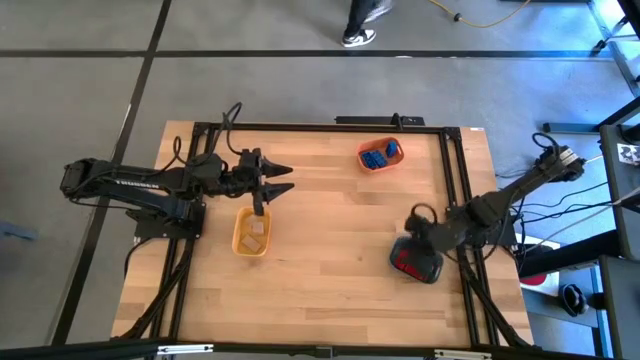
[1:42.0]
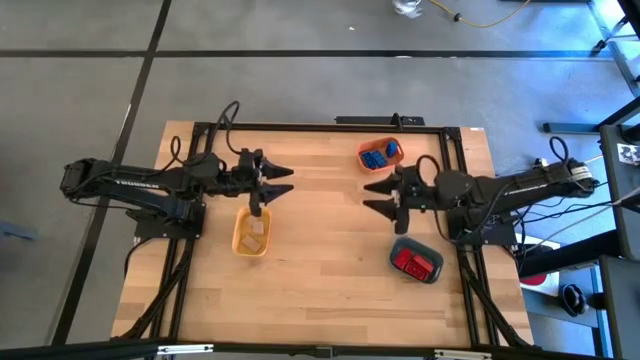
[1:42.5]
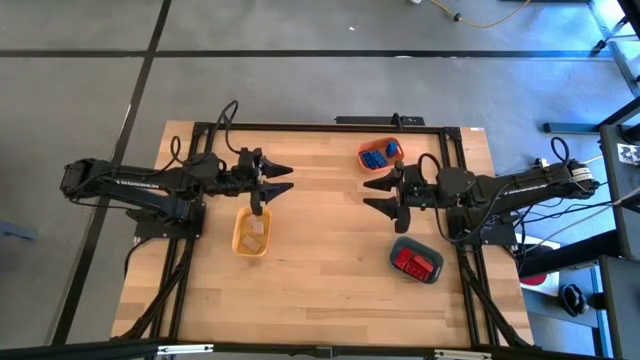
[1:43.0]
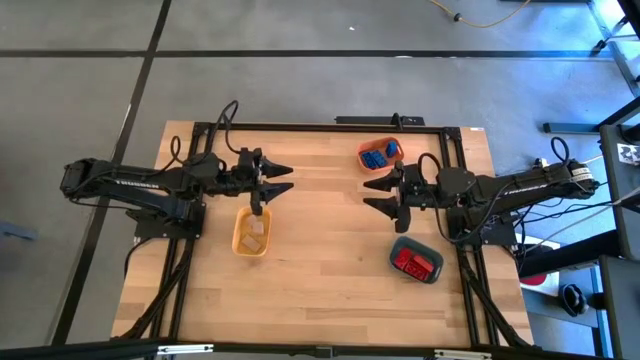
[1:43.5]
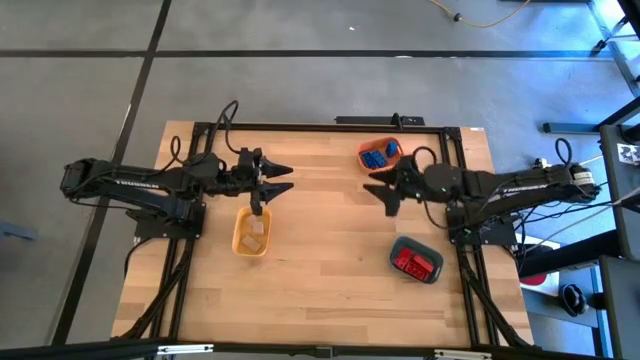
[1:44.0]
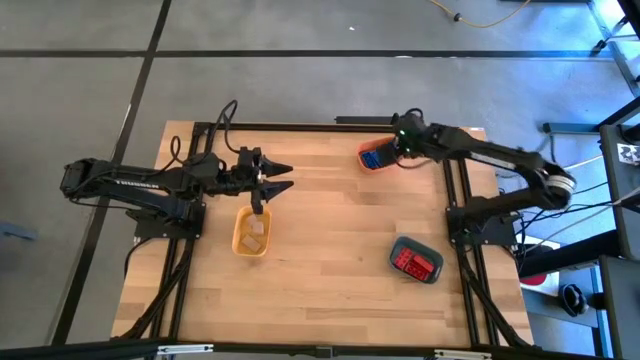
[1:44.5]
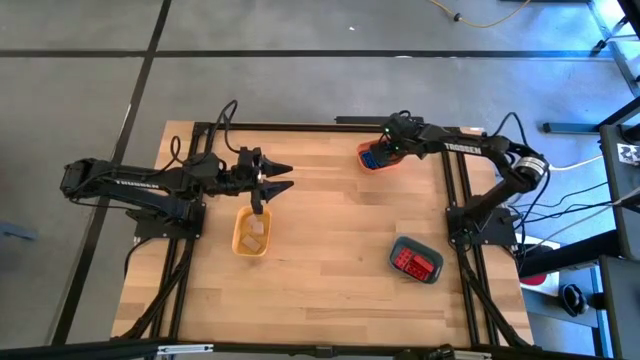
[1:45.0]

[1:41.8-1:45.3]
Task: Sort & place blocks by color
Adjust the blue game piece in the orange bin

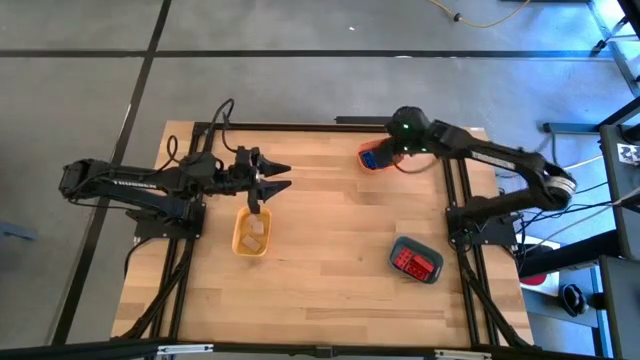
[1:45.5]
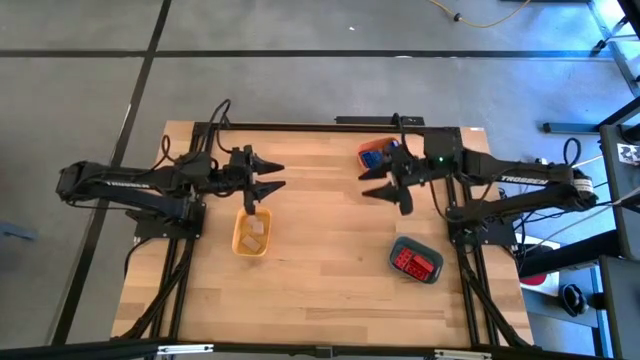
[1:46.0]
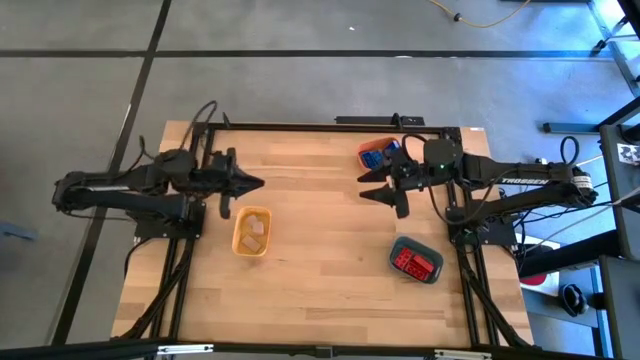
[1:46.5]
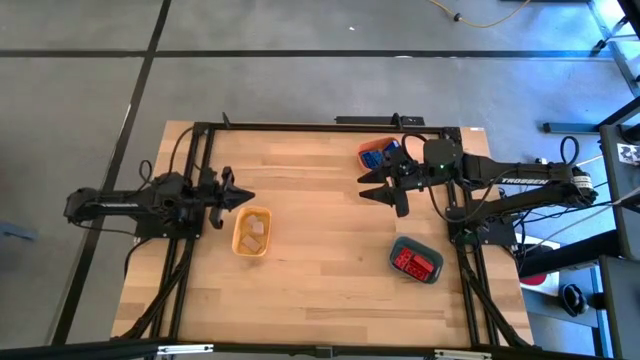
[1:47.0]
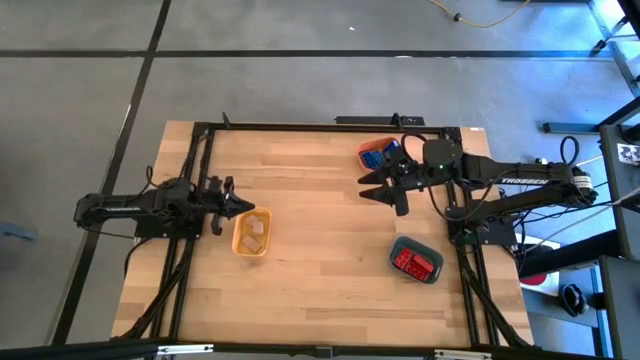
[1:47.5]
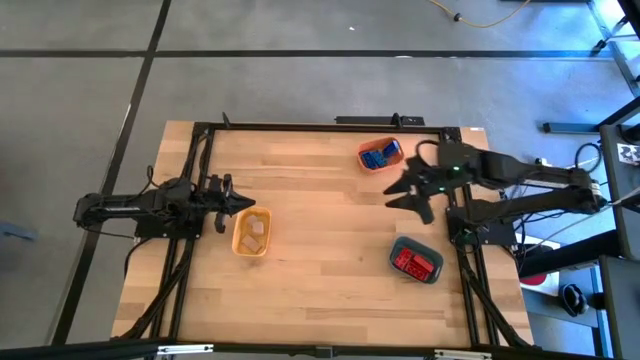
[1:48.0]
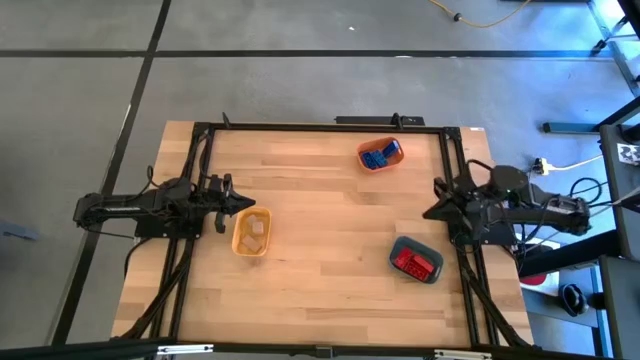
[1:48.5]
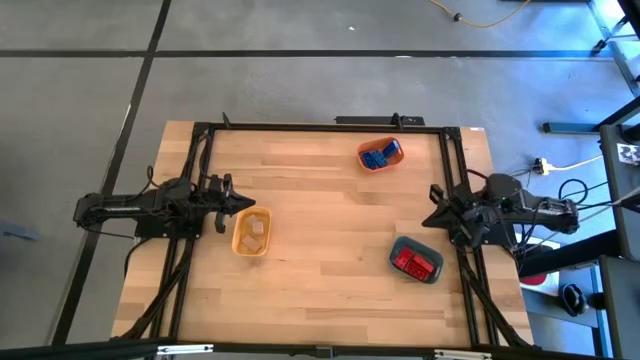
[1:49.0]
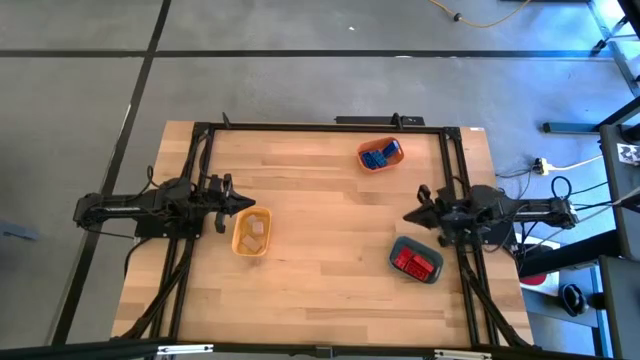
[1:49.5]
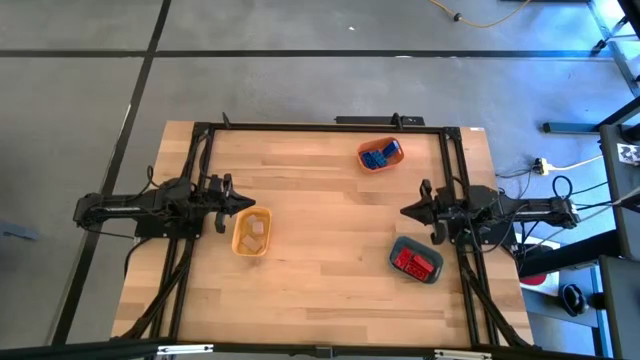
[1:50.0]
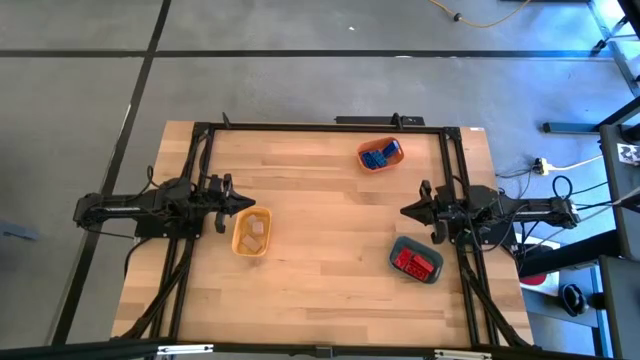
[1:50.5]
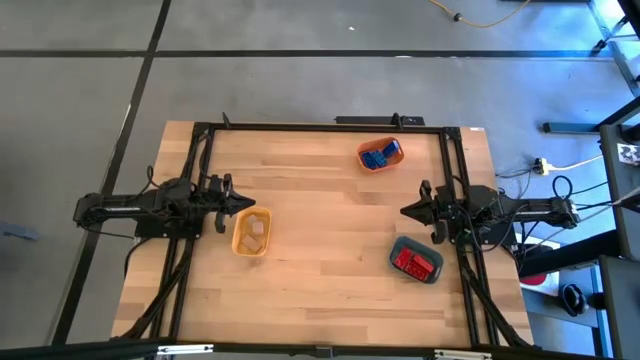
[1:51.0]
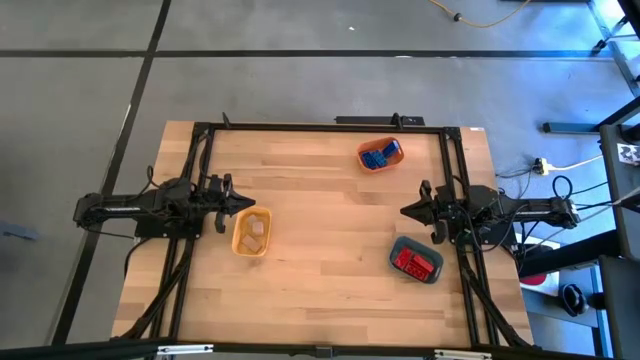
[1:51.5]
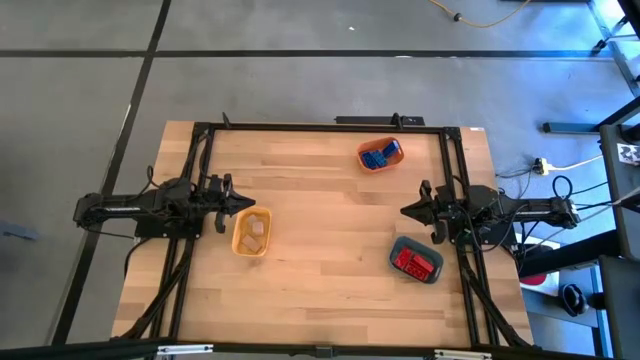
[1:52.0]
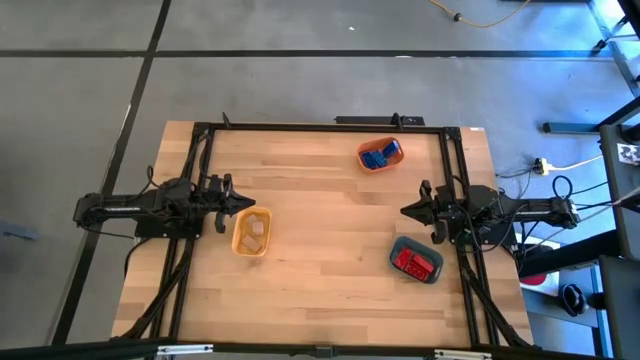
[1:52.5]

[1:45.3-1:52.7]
Return to Home Position

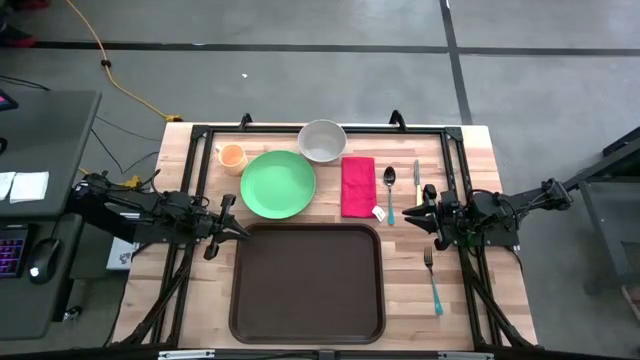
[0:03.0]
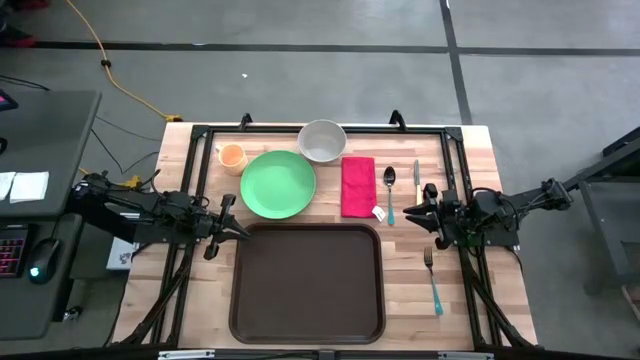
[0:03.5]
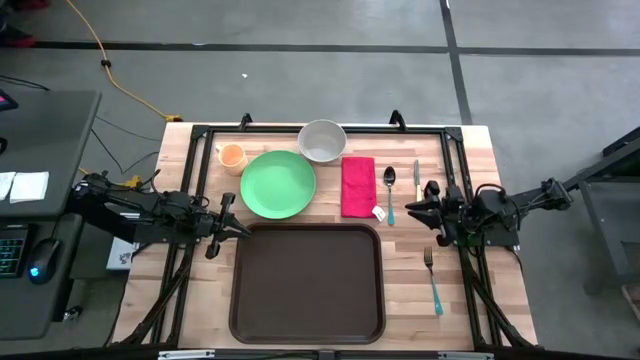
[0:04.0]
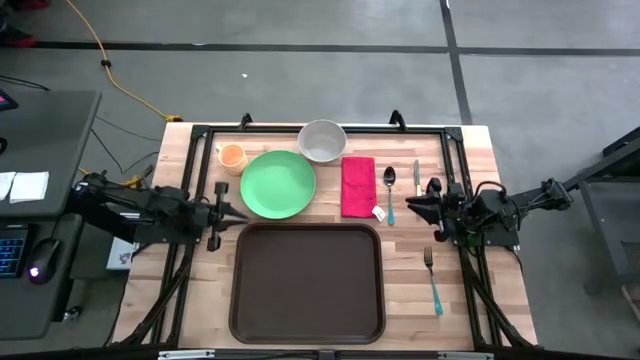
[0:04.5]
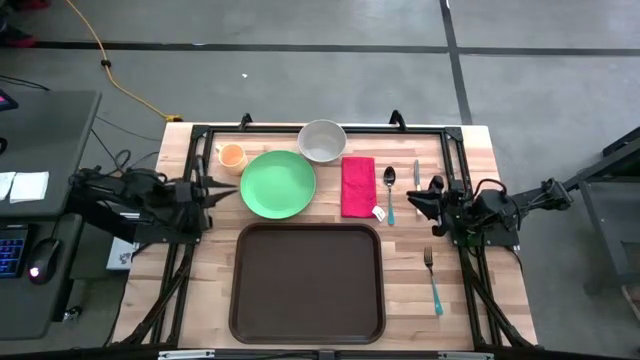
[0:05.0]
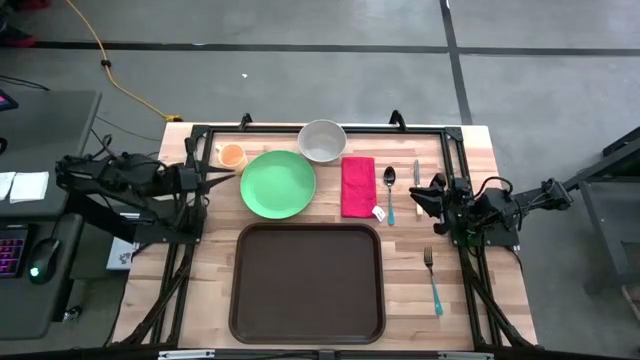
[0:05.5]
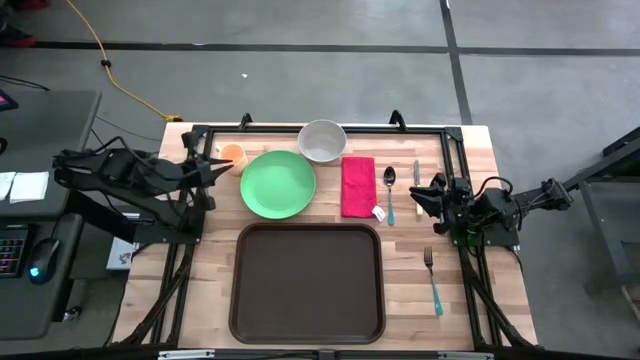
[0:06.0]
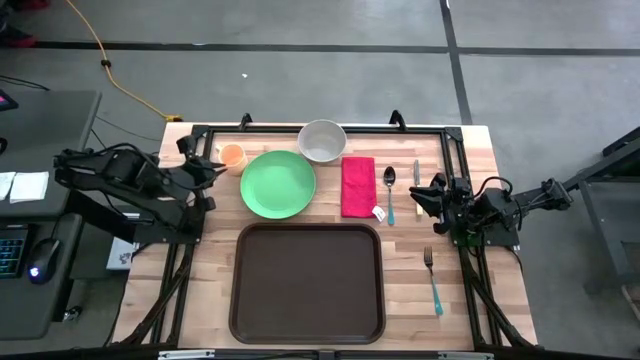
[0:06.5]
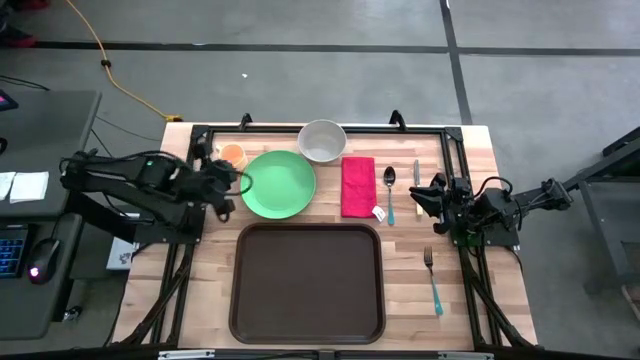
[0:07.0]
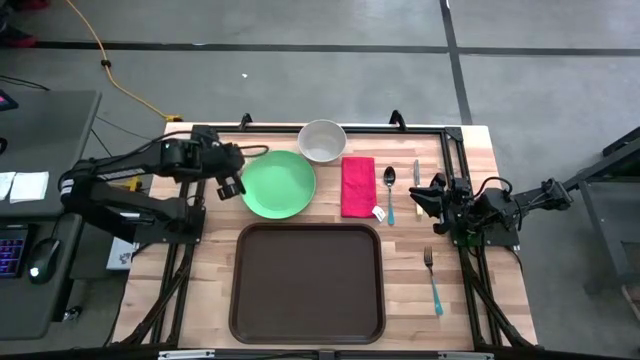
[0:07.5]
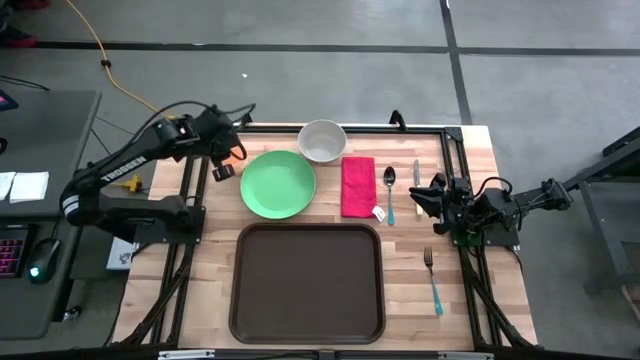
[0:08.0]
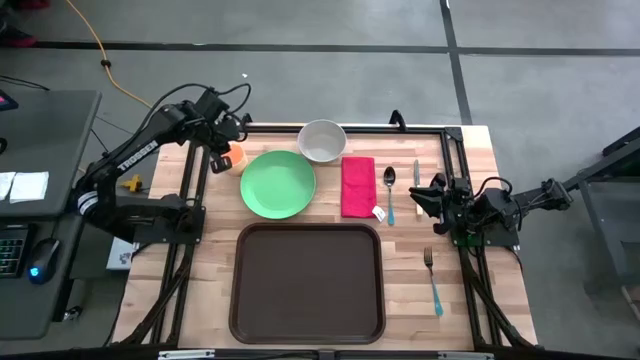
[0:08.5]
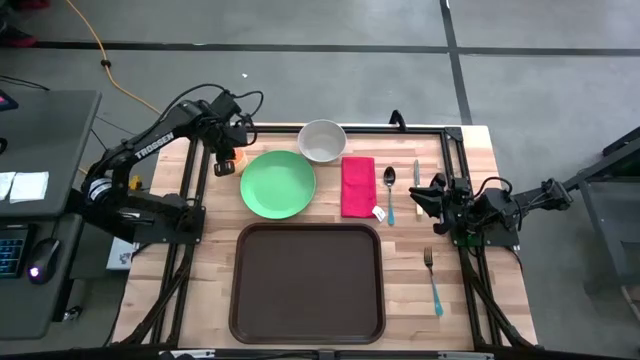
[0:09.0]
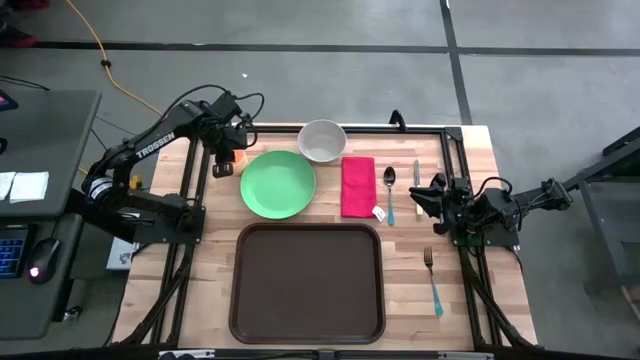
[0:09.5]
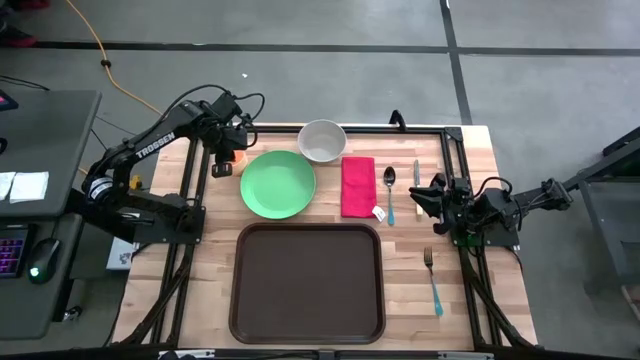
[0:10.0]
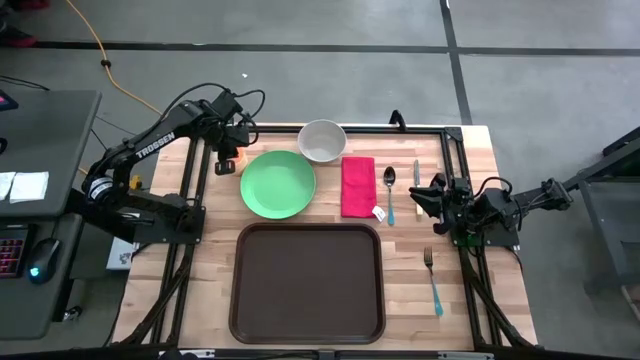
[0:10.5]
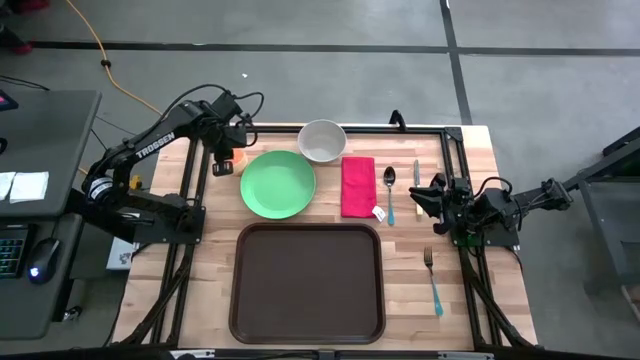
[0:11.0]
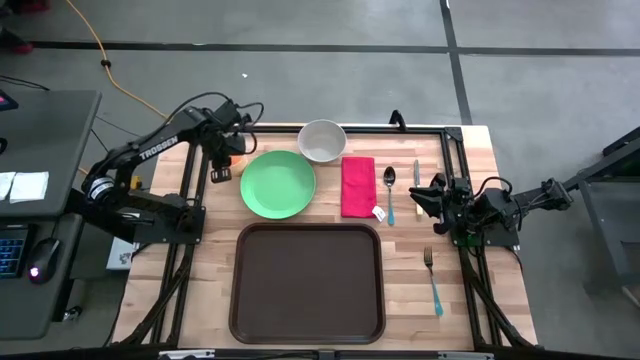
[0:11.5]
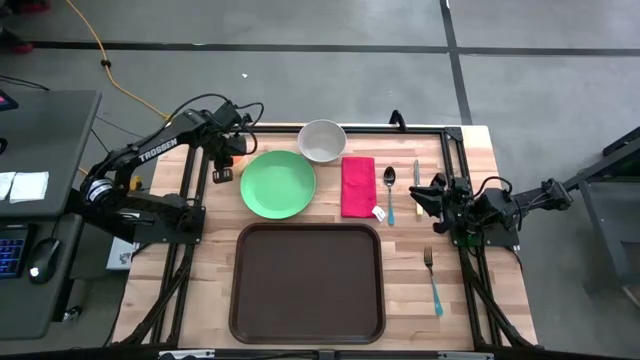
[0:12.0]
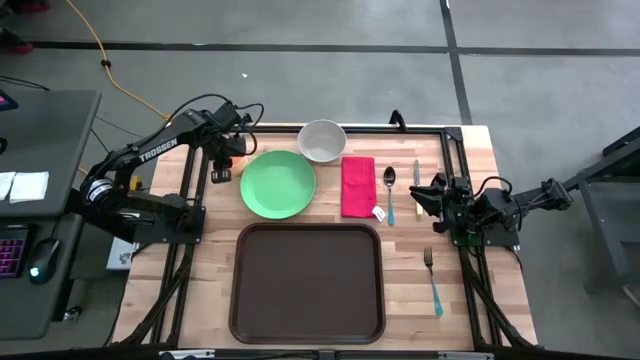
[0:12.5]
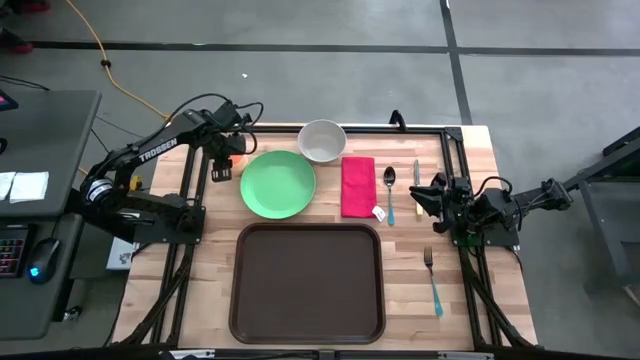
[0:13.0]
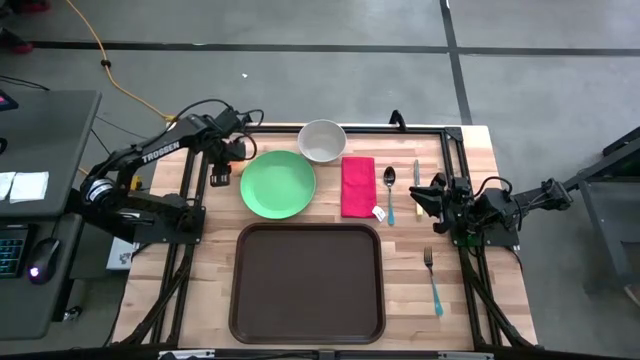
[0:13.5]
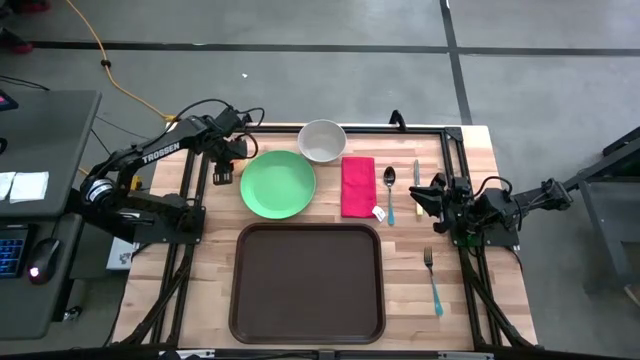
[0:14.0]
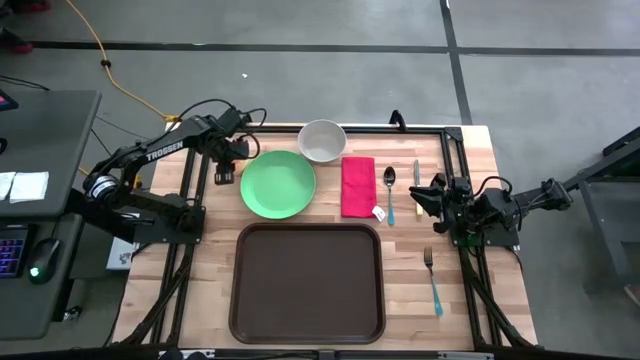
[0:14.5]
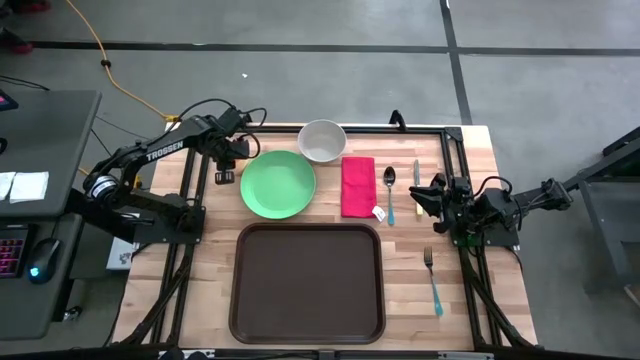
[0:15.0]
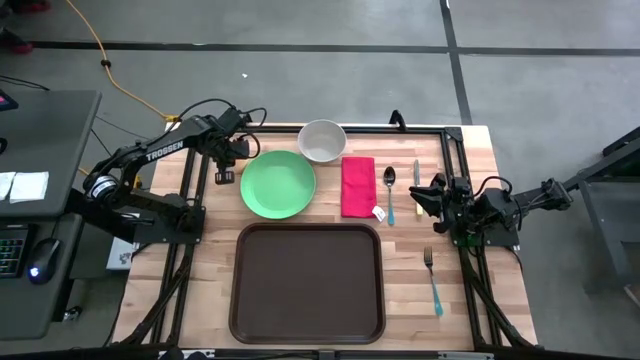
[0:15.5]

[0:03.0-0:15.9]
Task: Set up tray
Put the light orange cup on the brown serving tray
